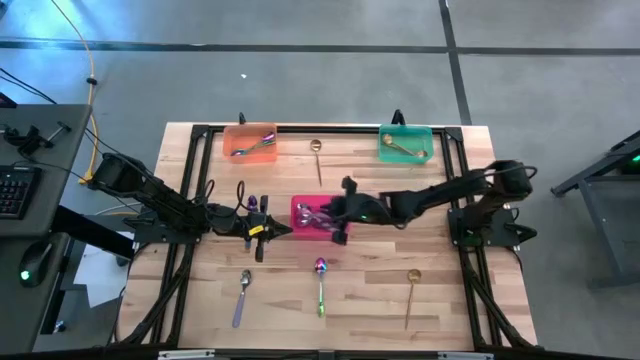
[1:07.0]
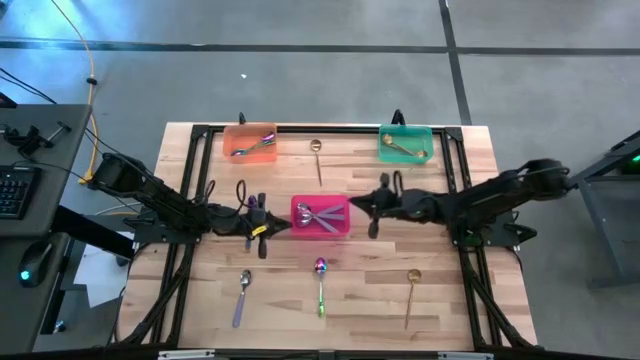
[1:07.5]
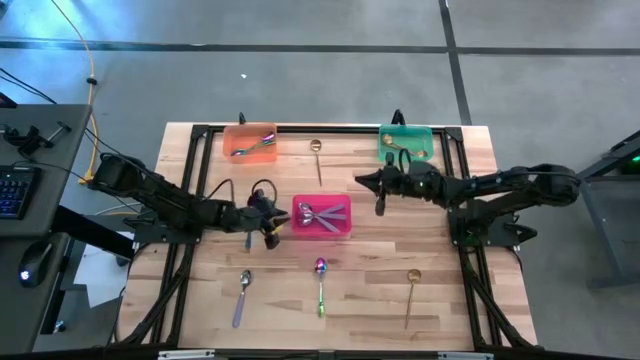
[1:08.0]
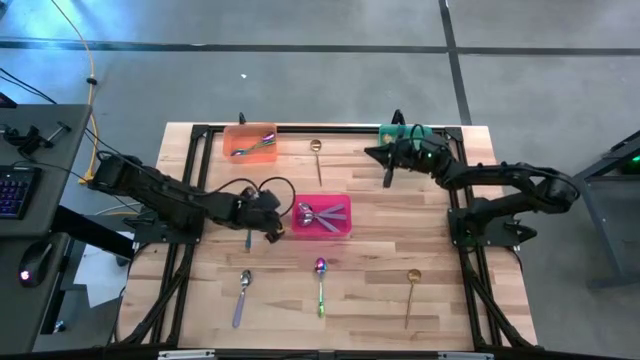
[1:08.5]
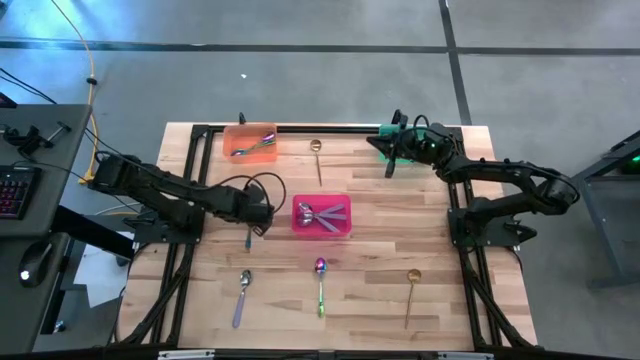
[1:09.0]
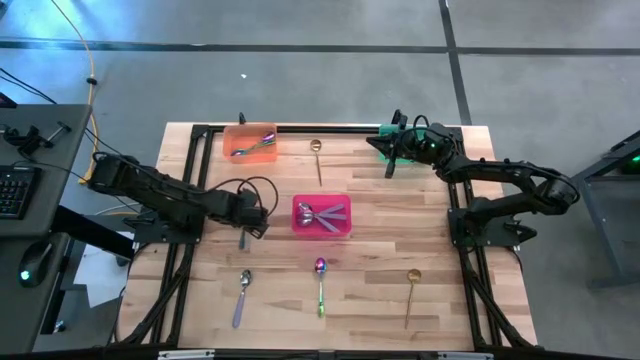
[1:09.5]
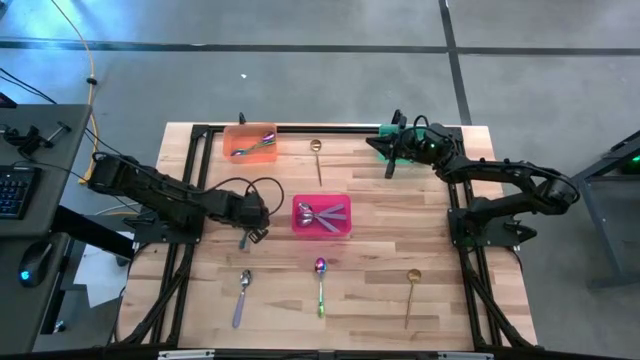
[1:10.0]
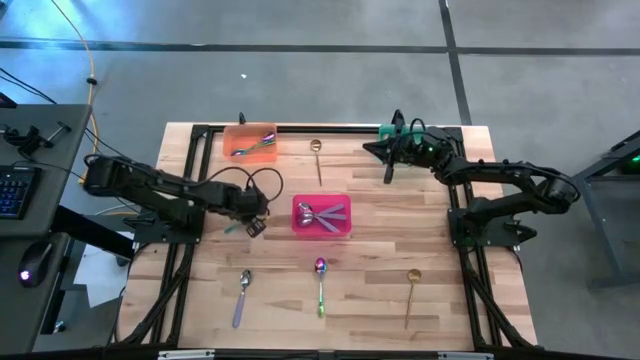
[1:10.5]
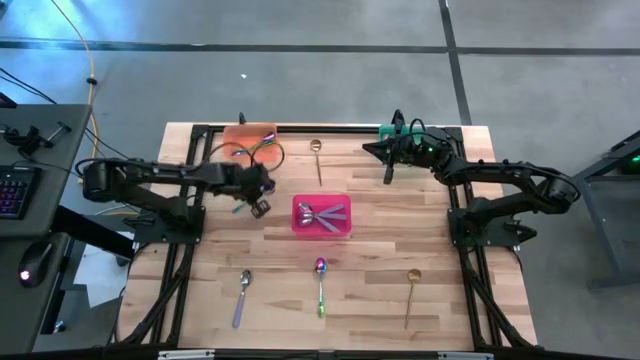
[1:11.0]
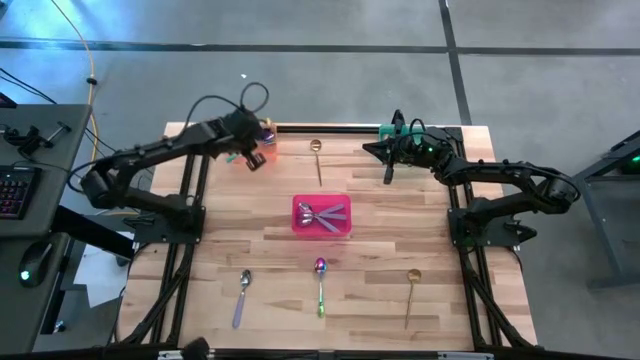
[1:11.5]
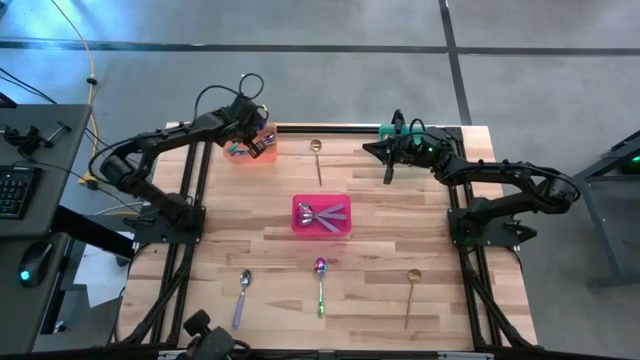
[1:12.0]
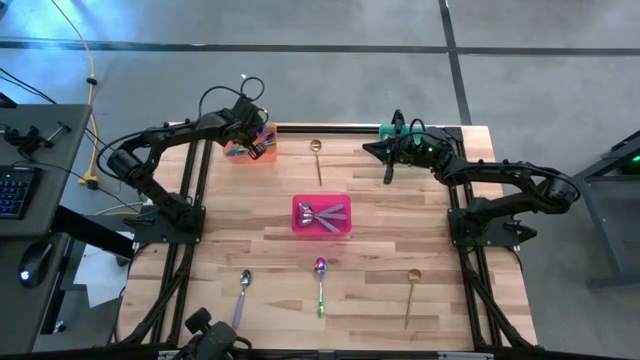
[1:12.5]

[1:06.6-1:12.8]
Task: Sort silverware by color (type)
Put the green spoon into the orange bin

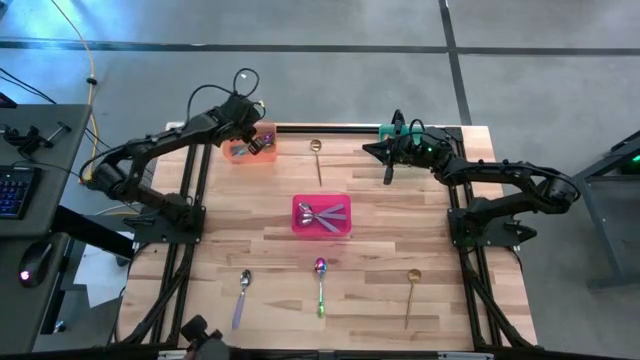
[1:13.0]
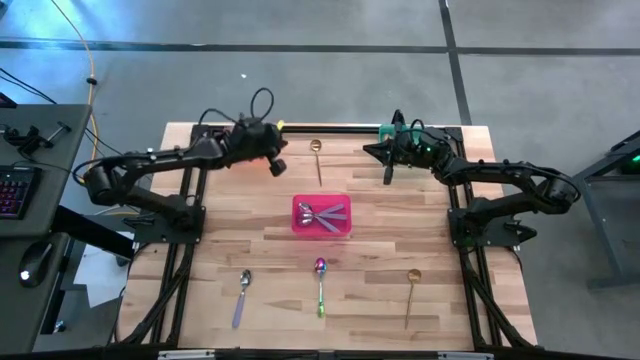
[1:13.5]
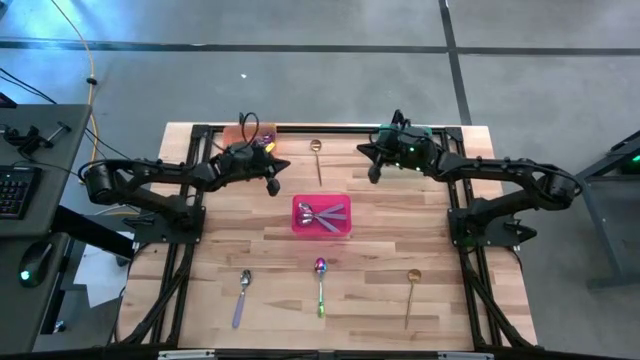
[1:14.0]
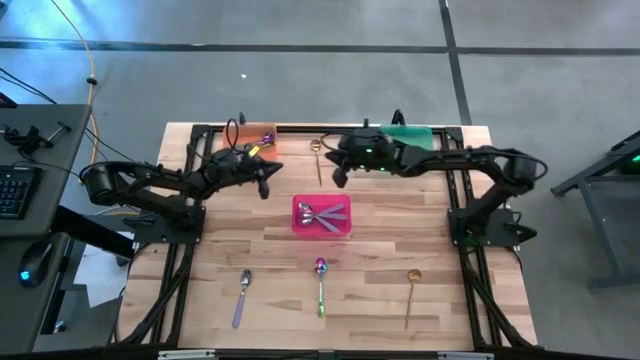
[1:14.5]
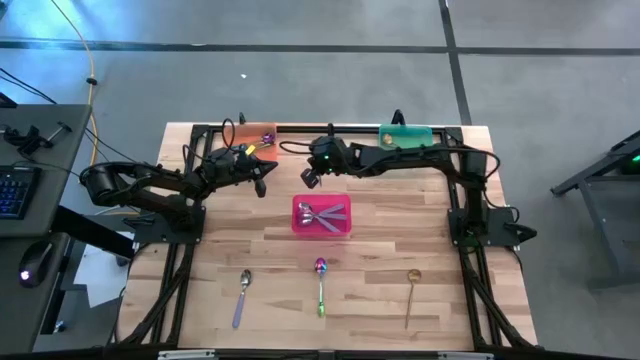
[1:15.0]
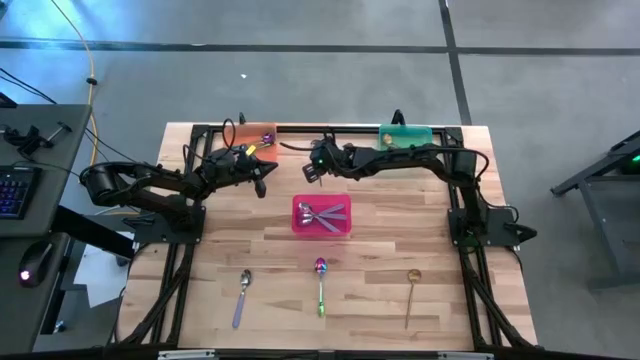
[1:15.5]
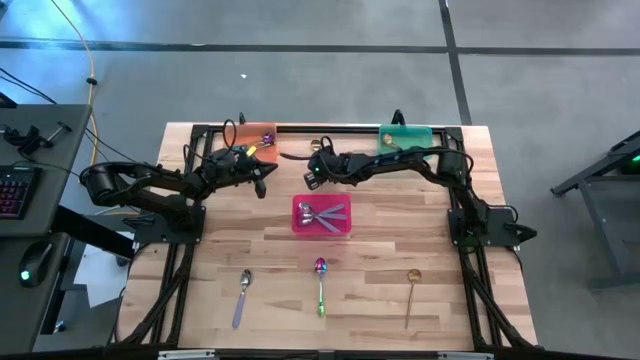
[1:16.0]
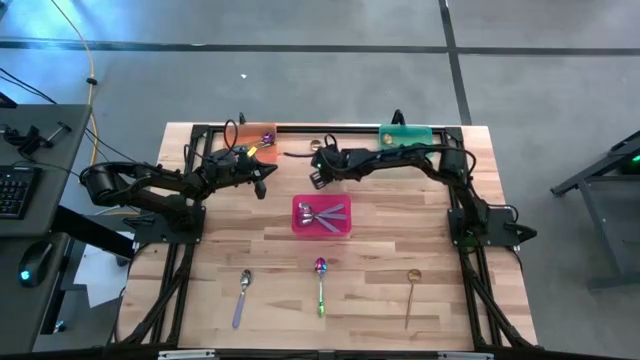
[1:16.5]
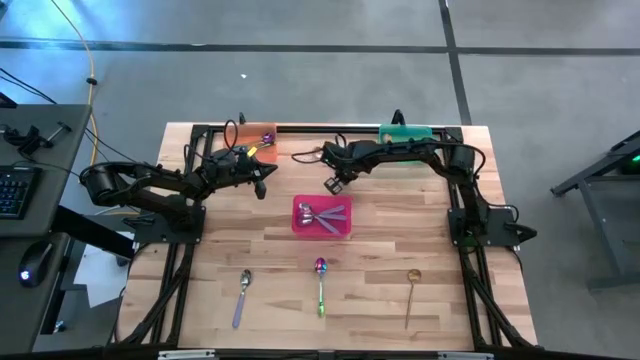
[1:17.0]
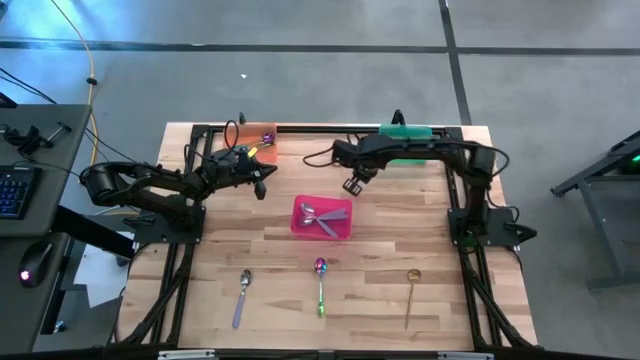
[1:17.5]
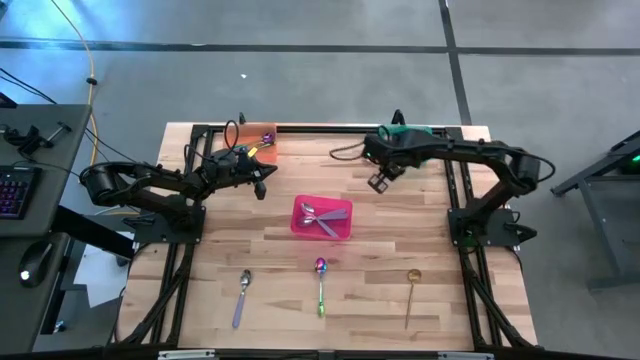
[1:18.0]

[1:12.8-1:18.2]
Put the gold spoon into the green bin

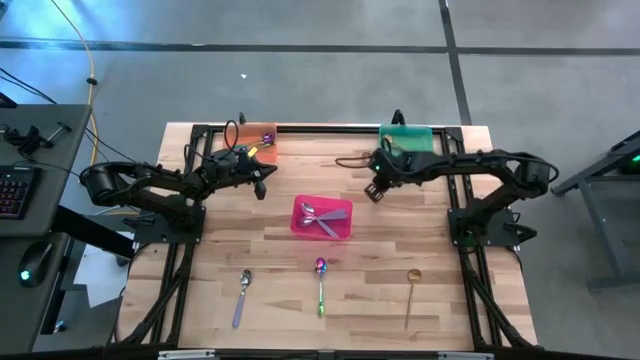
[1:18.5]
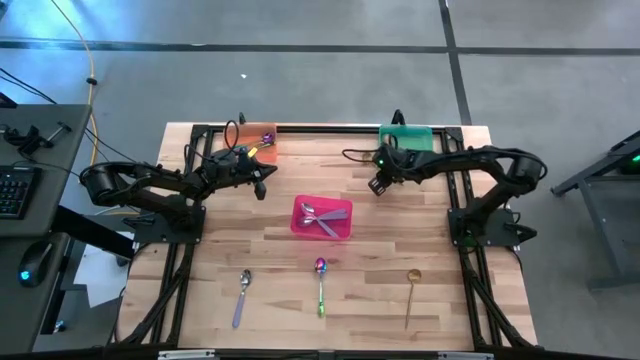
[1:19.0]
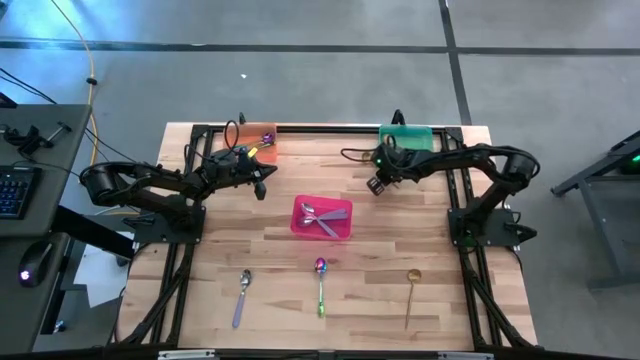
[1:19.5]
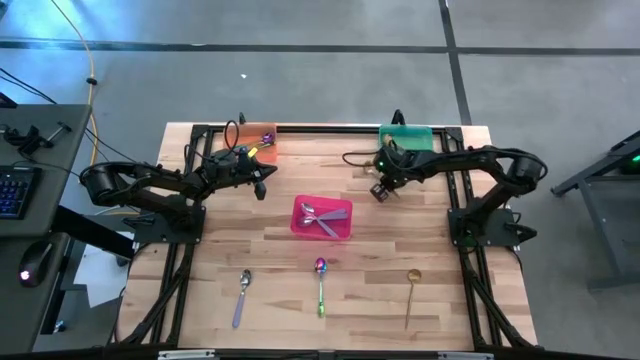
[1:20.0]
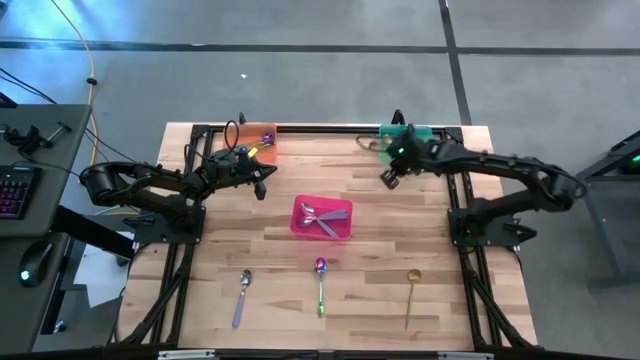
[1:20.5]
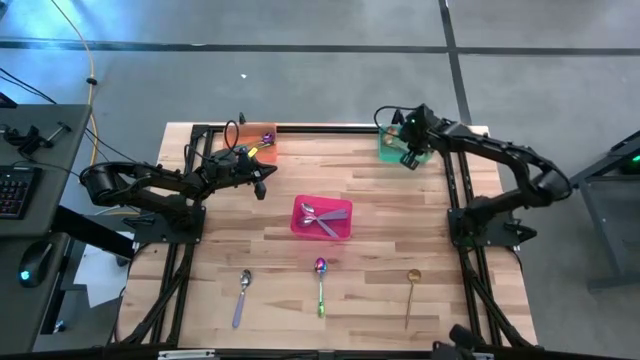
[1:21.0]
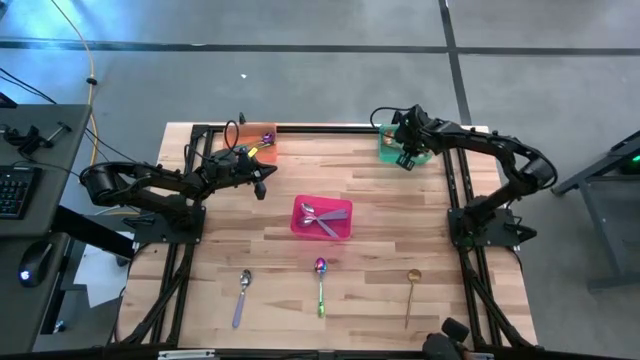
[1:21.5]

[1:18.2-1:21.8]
Put the gold spoon into the green bin

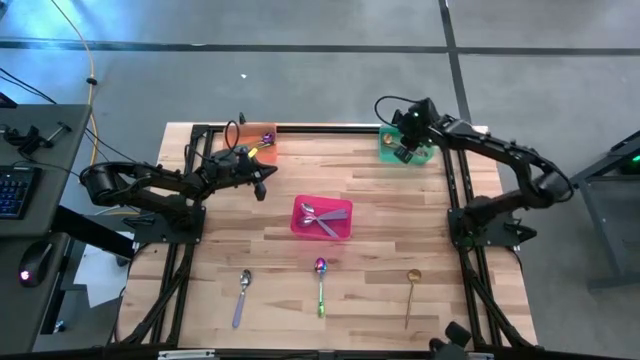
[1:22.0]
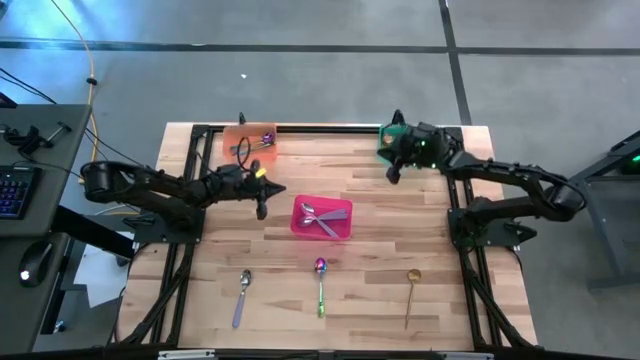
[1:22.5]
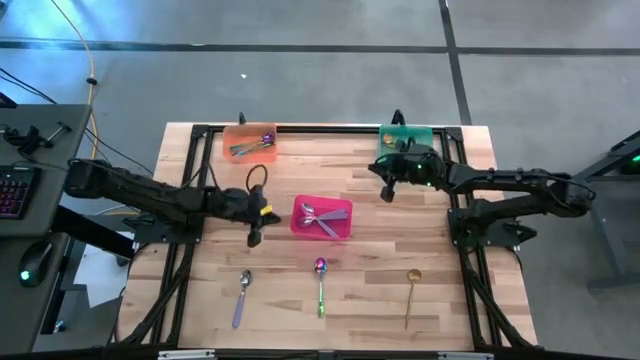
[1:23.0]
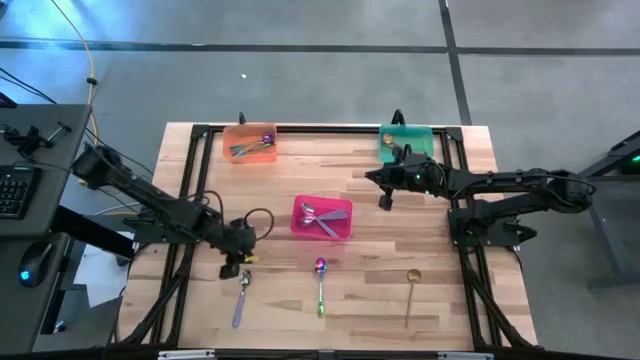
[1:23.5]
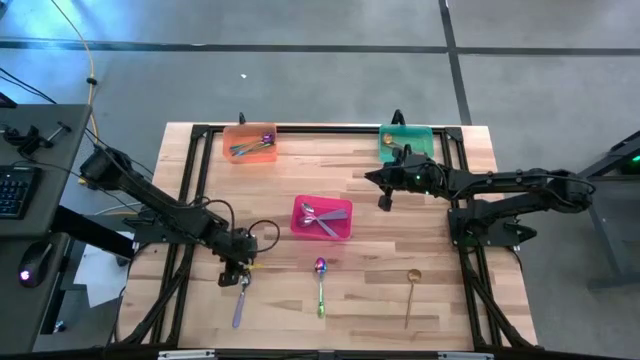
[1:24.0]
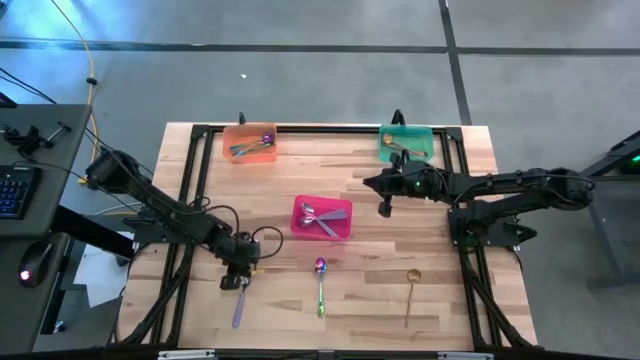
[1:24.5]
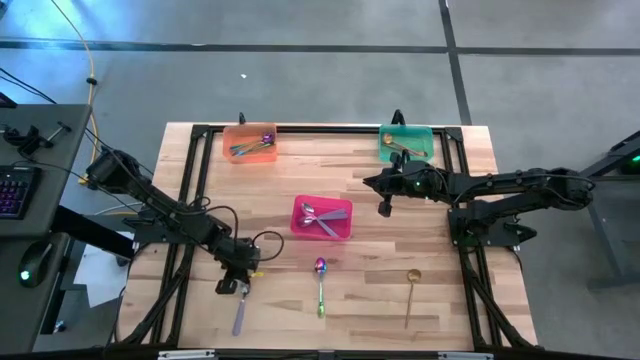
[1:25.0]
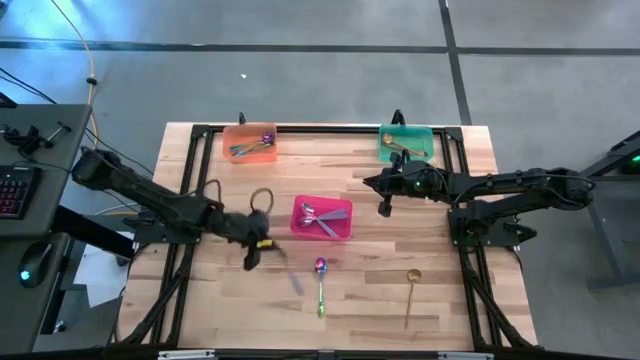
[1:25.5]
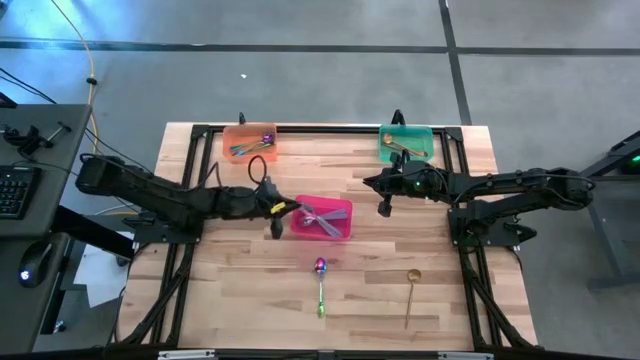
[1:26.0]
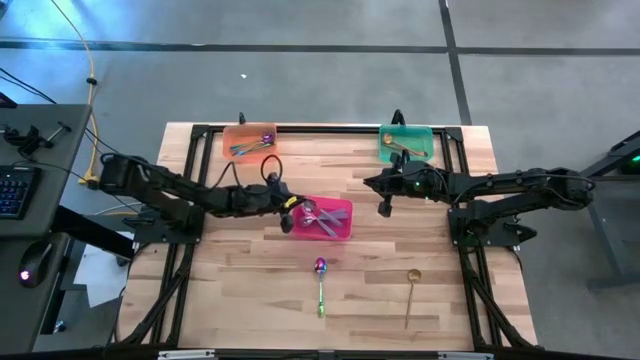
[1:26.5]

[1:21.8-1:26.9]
Put the purple spoon into the red bin
